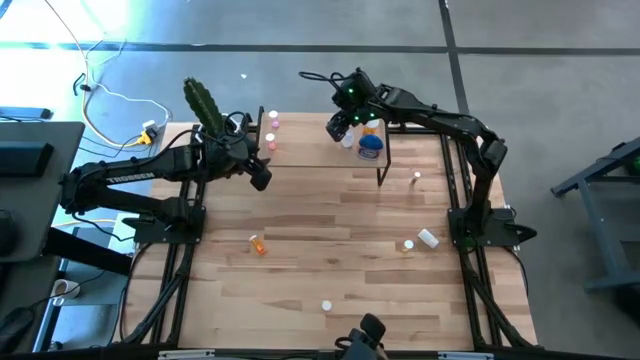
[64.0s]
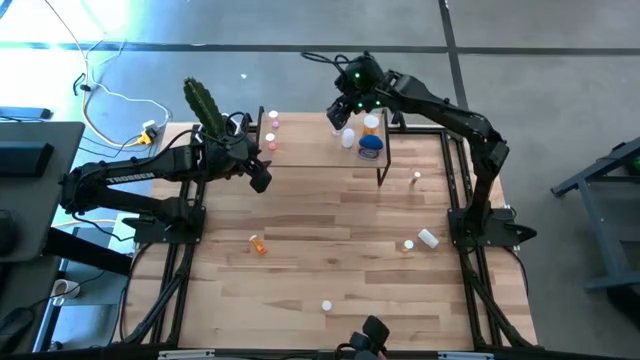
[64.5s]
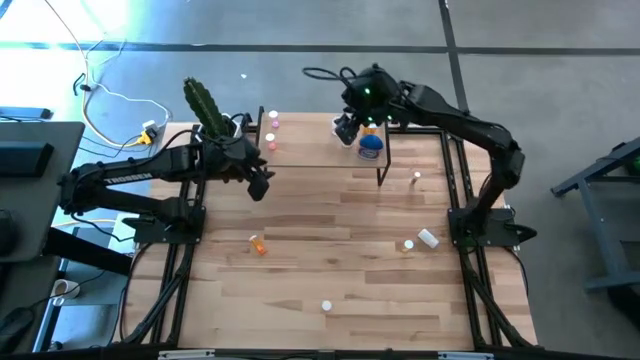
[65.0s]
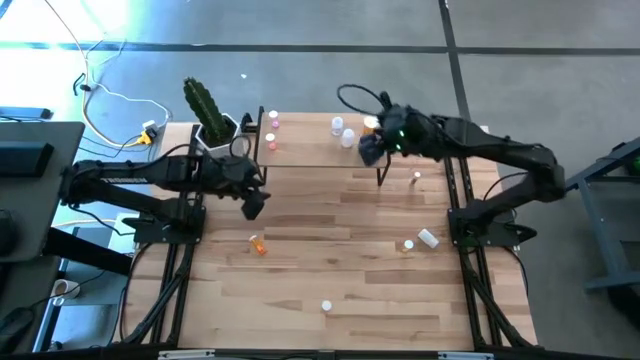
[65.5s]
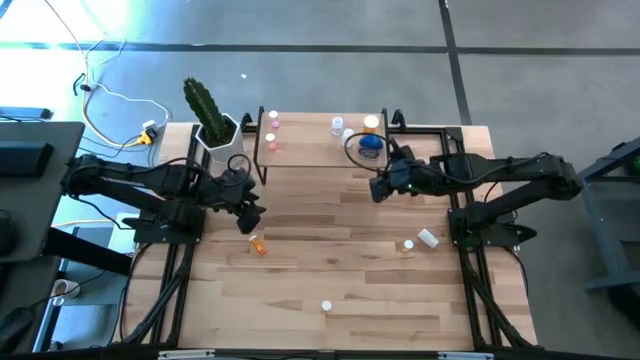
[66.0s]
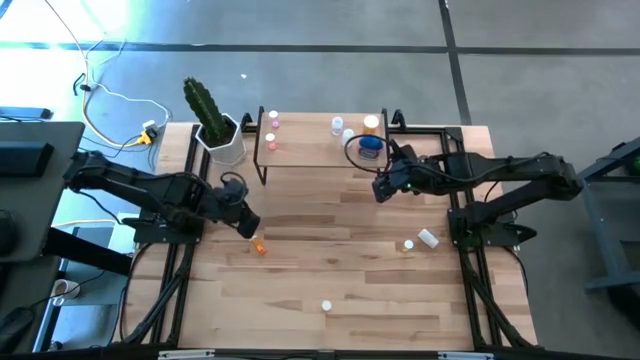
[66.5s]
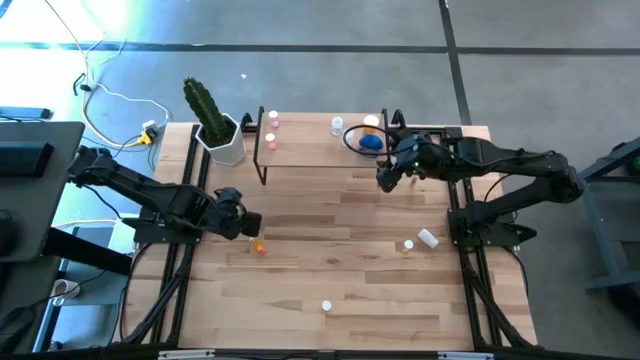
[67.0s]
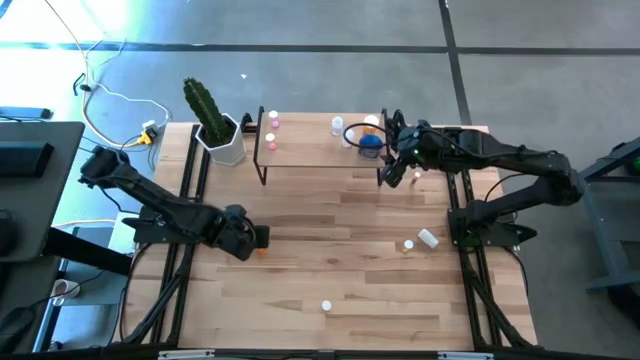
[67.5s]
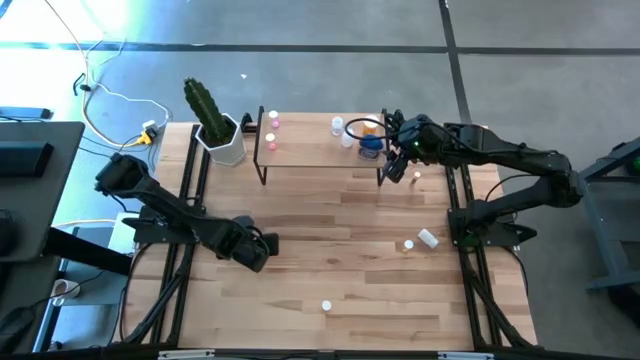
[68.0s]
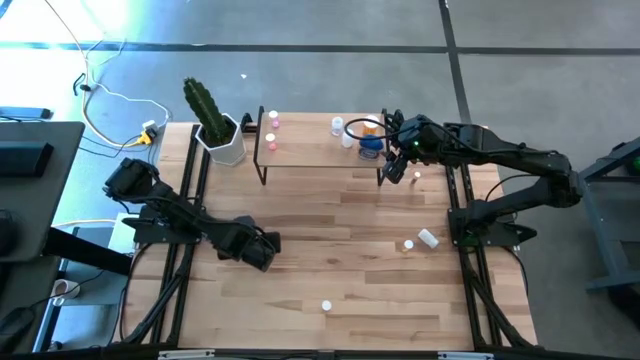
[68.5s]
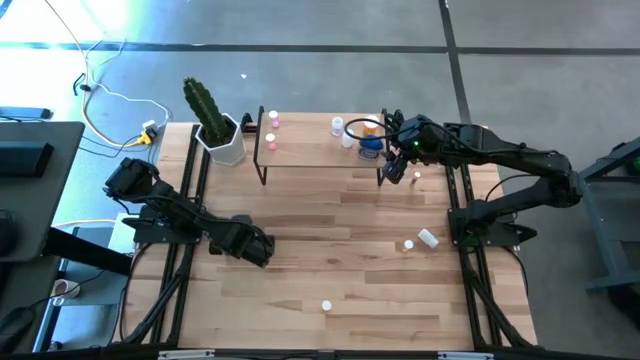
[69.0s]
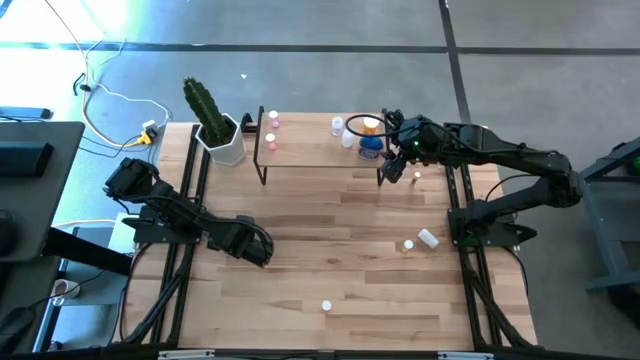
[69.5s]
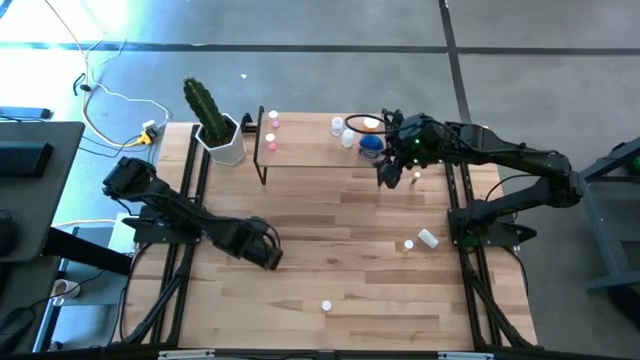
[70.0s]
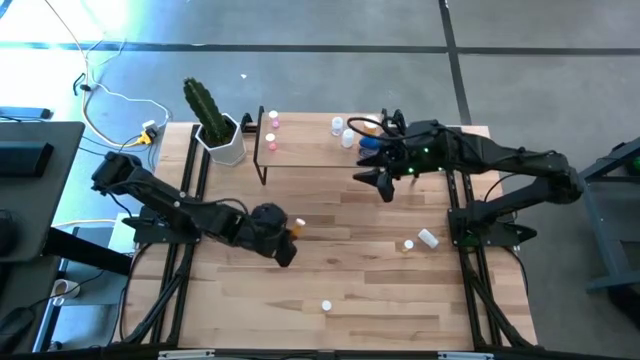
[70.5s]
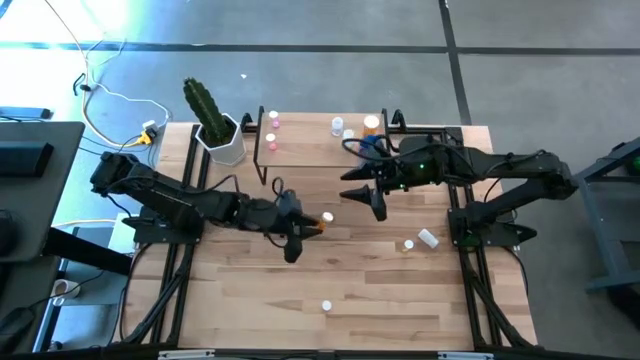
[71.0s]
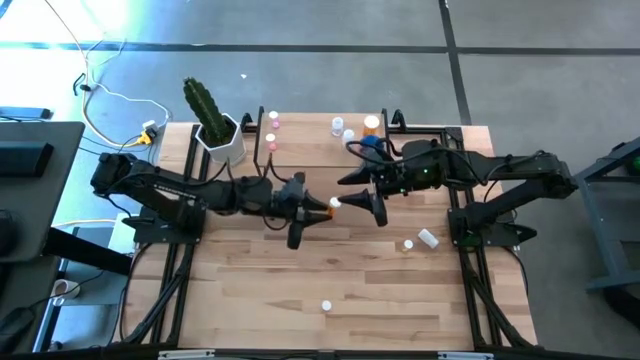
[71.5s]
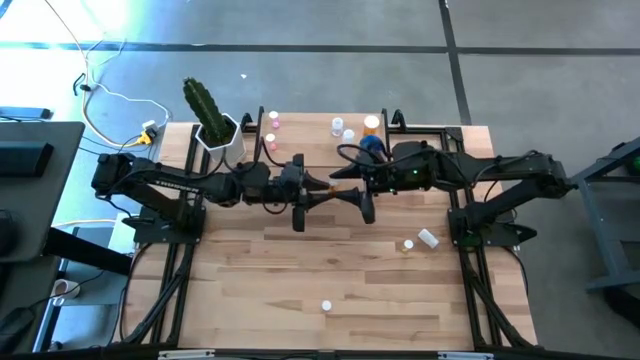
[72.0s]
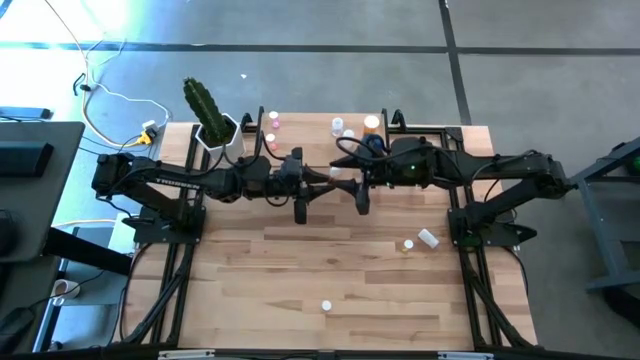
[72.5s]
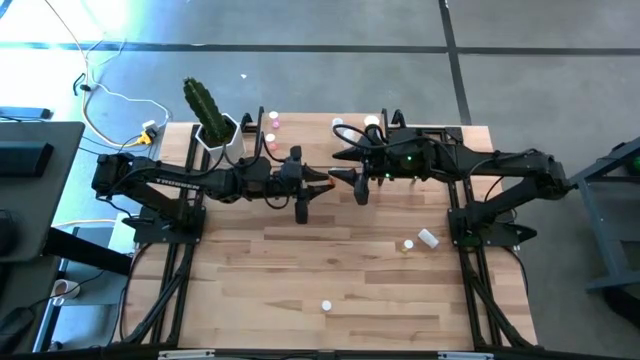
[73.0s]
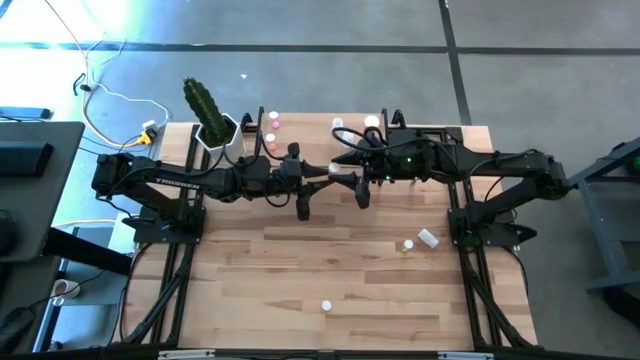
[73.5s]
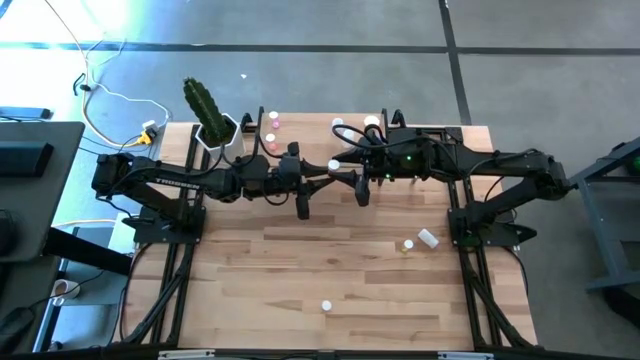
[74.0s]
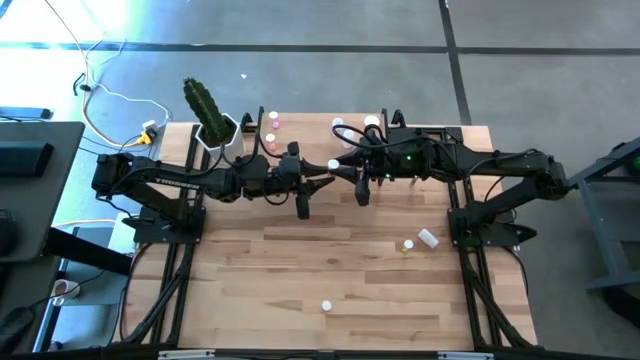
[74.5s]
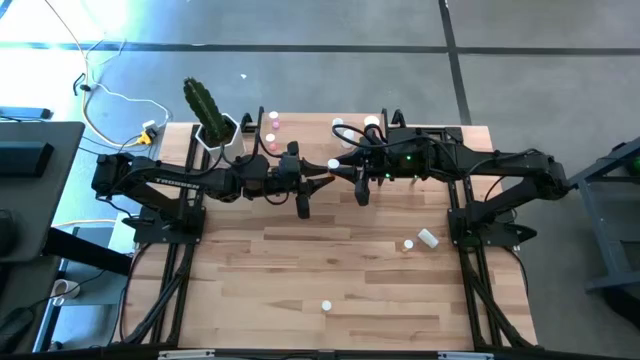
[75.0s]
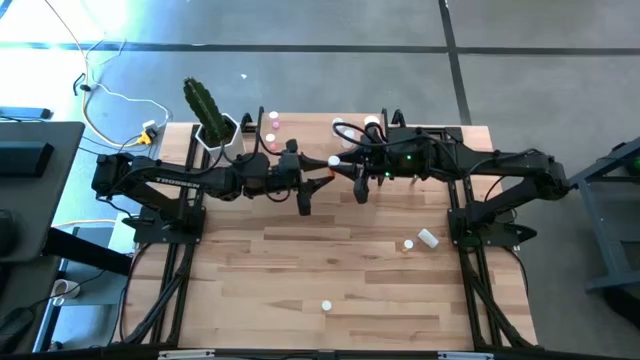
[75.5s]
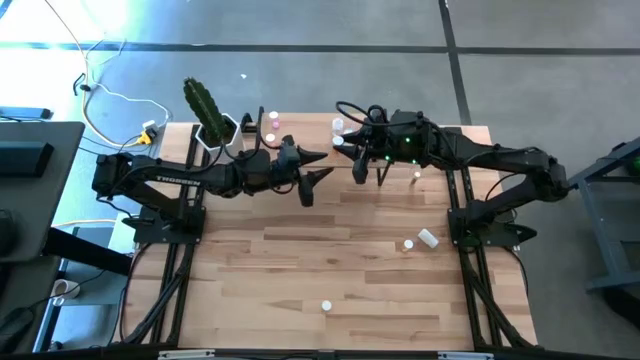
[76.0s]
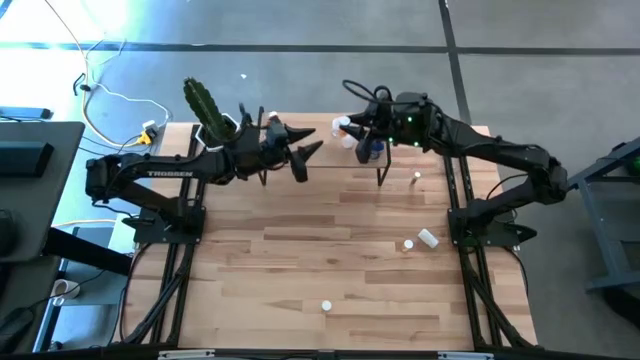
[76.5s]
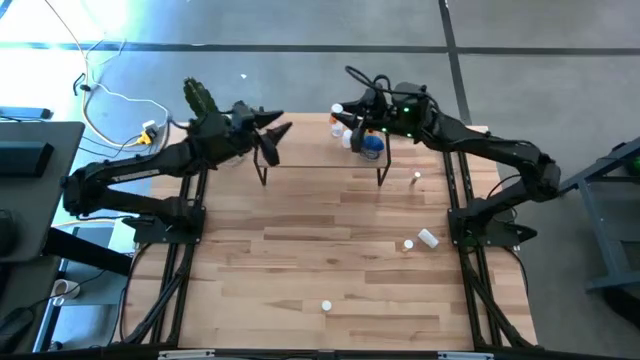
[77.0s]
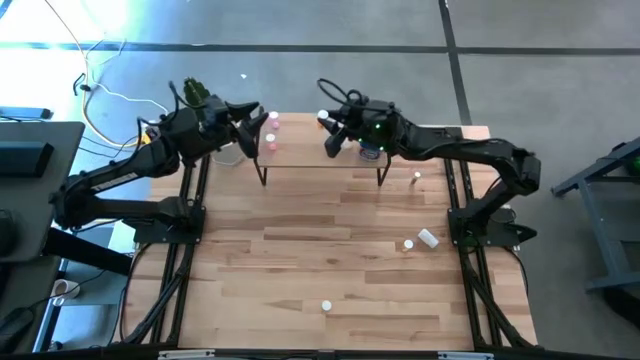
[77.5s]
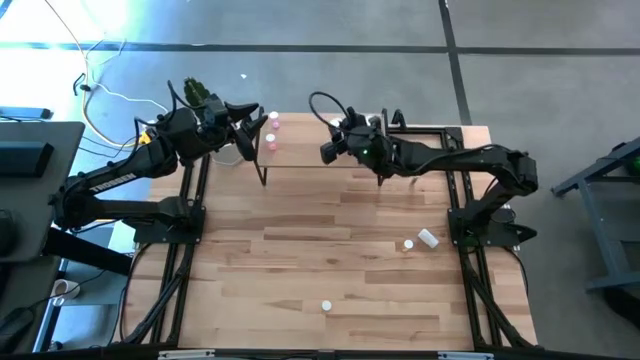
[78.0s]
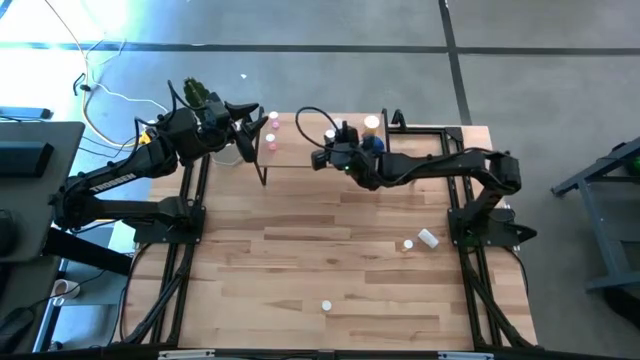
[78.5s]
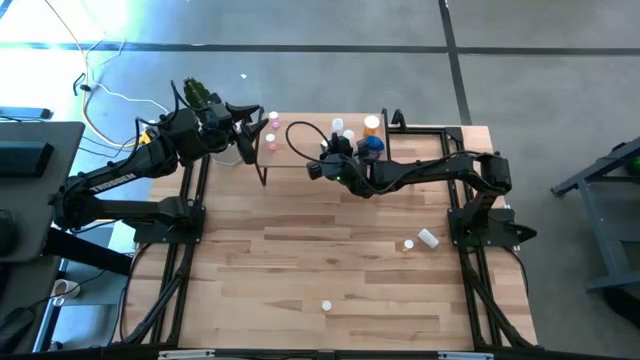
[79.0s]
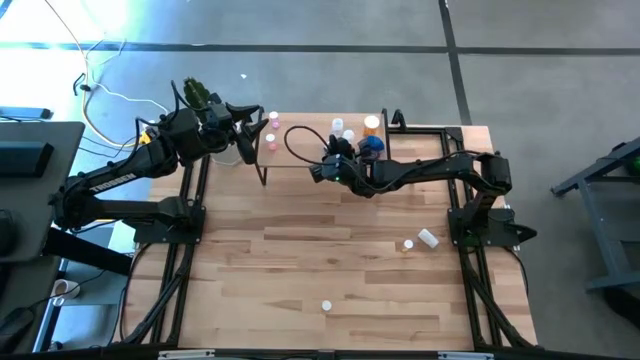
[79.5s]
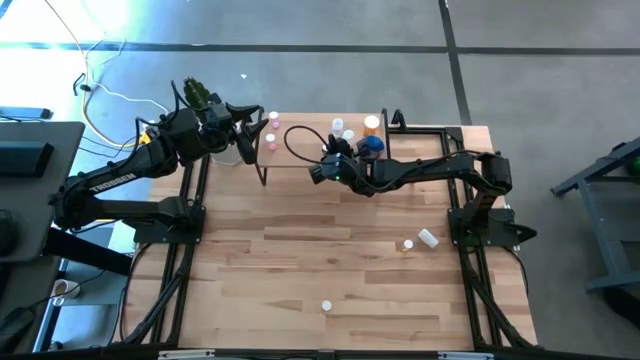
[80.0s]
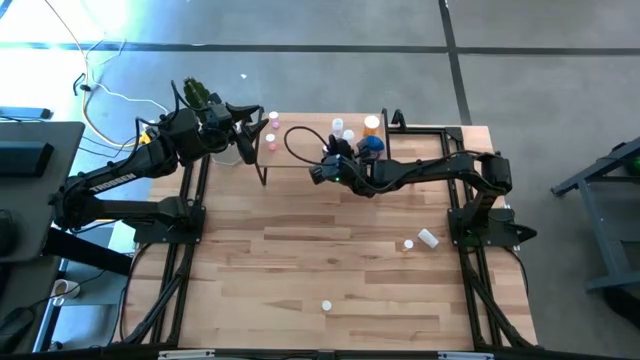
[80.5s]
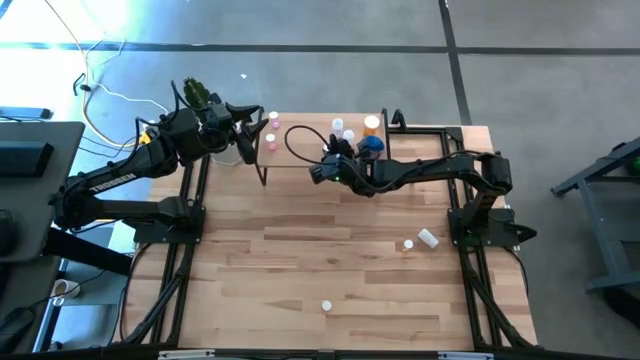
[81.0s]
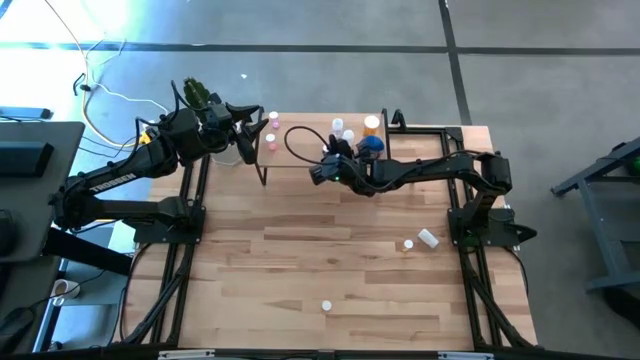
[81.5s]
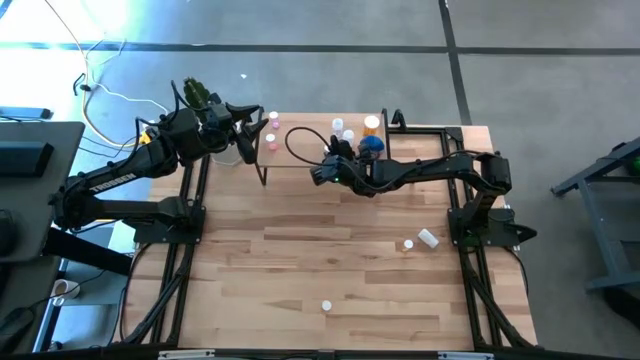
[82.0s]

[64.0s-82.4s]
Task: Pick and place medicine bottles onto shelf by color
Put the top orange pill bottle on the shelf

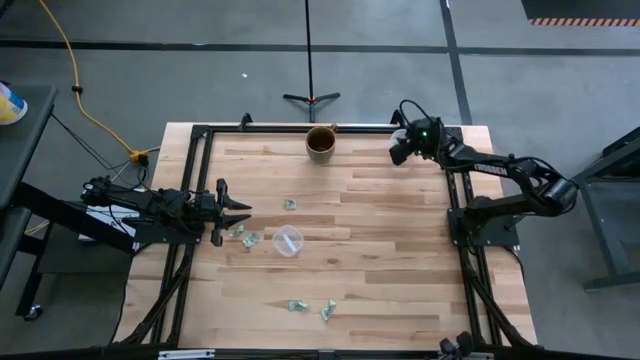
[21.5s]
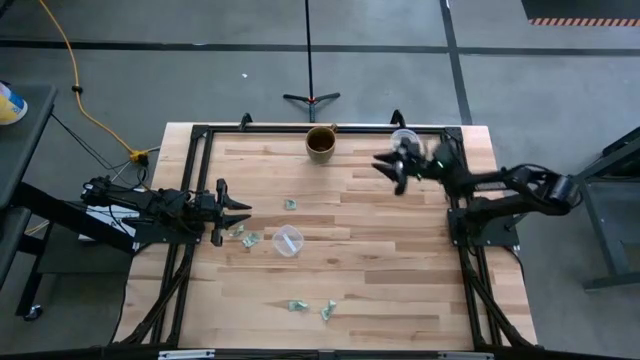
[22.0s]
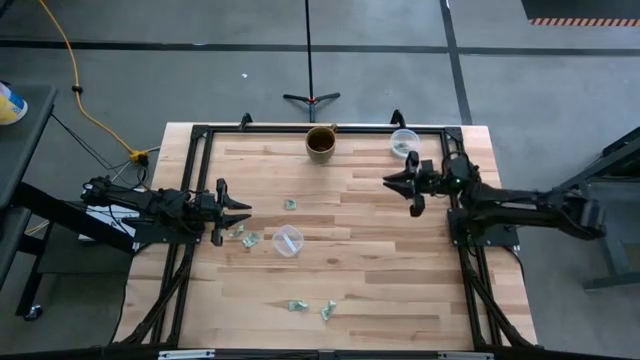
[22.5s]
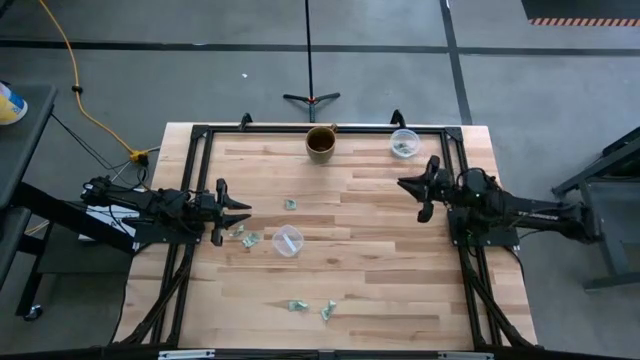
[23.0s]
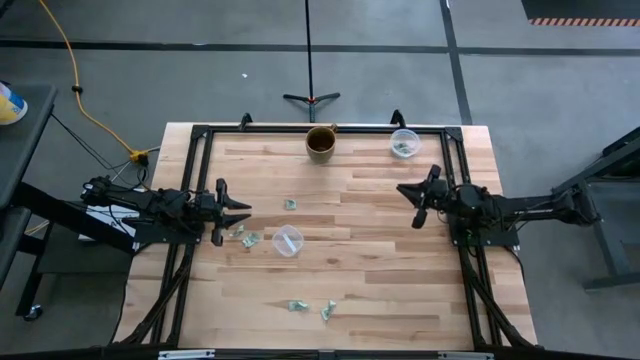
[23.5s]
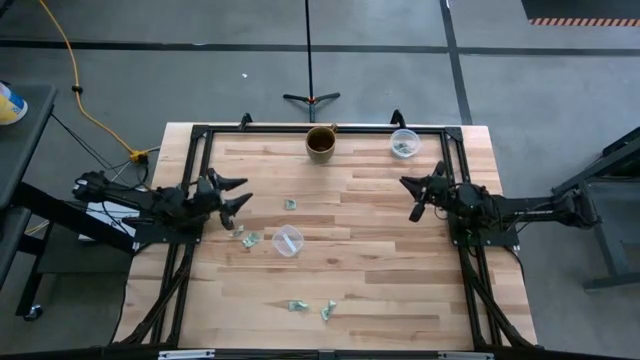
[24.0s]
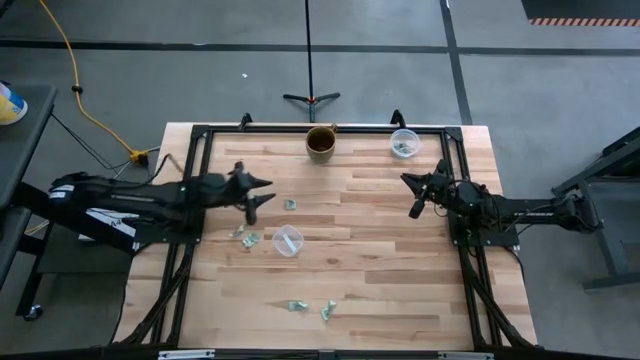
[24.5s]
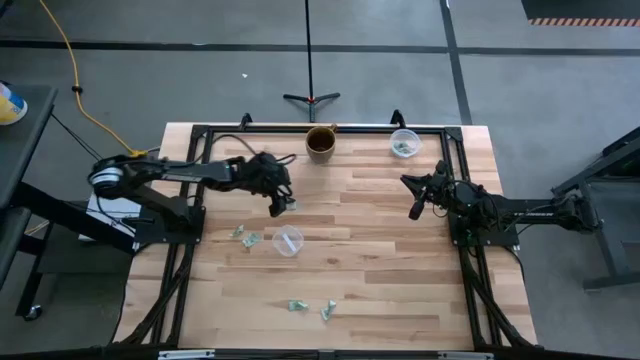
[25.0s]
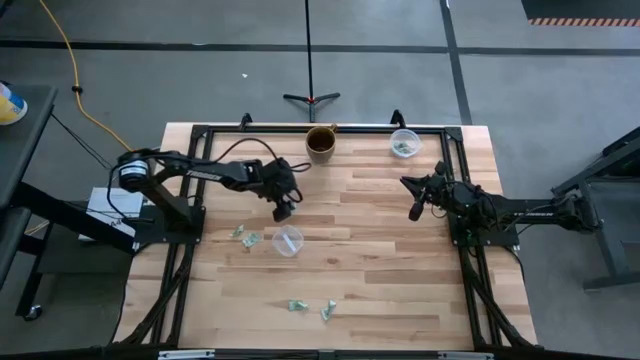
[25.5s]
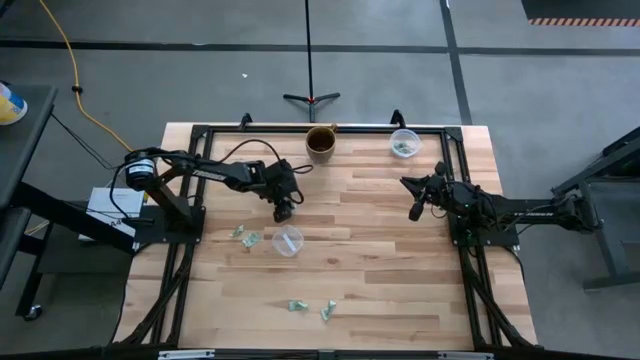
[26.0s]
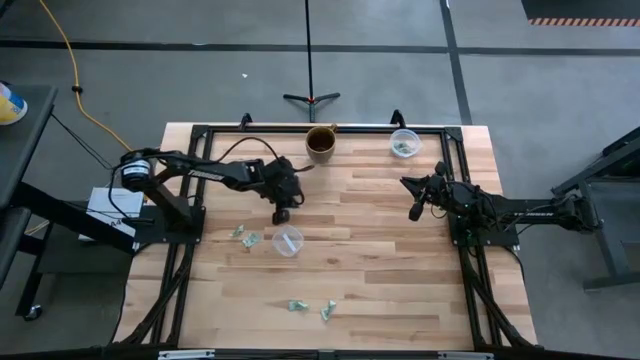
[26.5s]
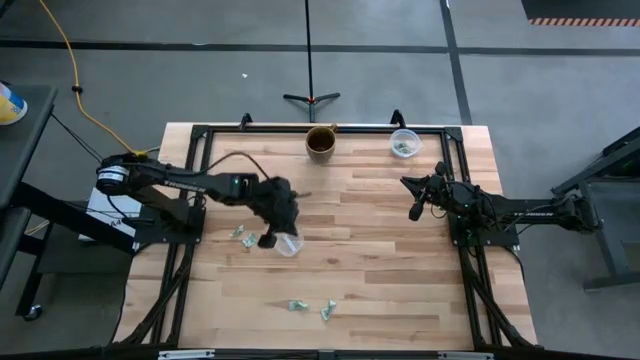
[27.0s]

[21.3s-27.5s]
Task: Pick and place items into bin
Put the stevia packet into the bottom transparent bin
